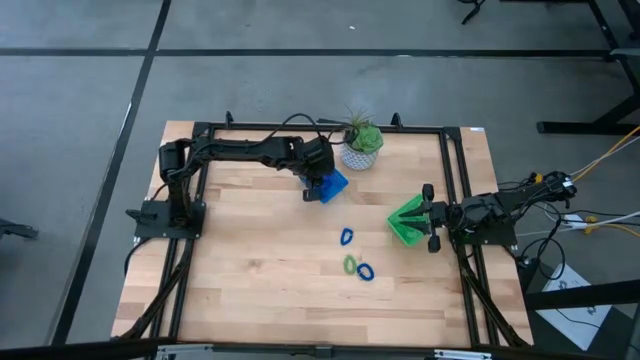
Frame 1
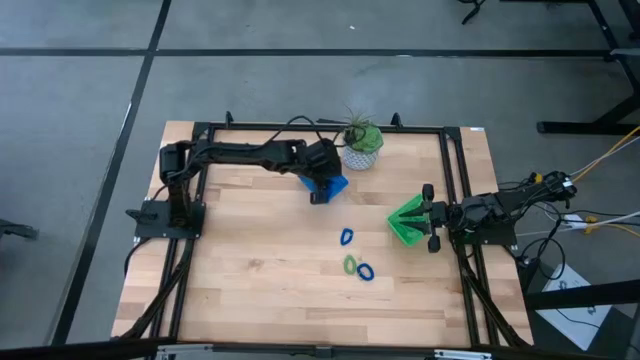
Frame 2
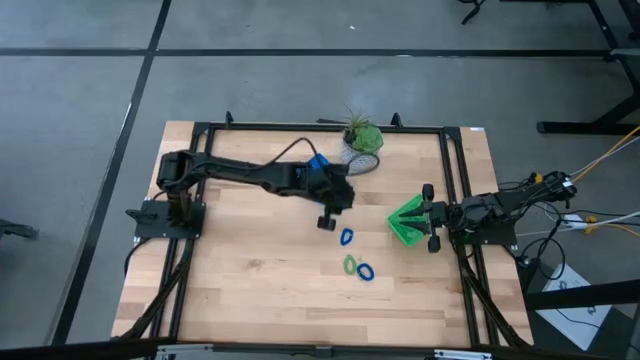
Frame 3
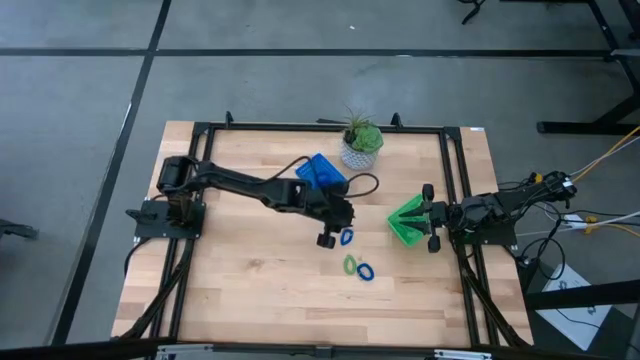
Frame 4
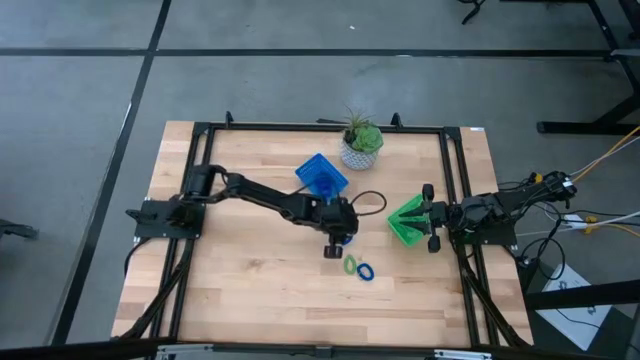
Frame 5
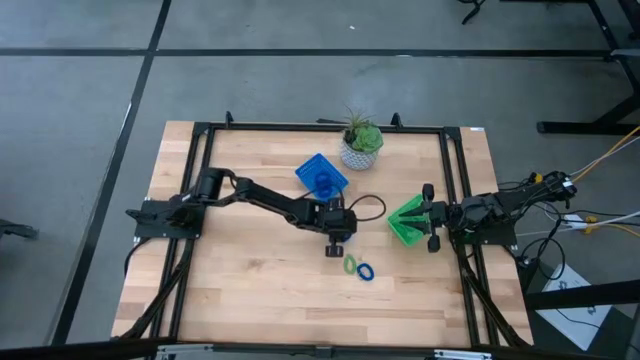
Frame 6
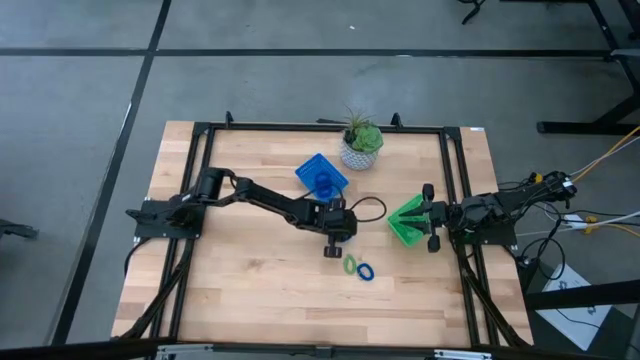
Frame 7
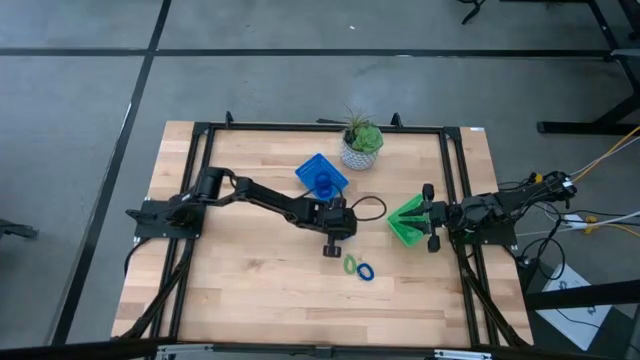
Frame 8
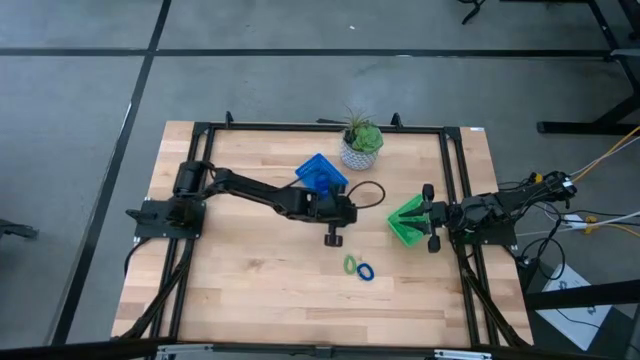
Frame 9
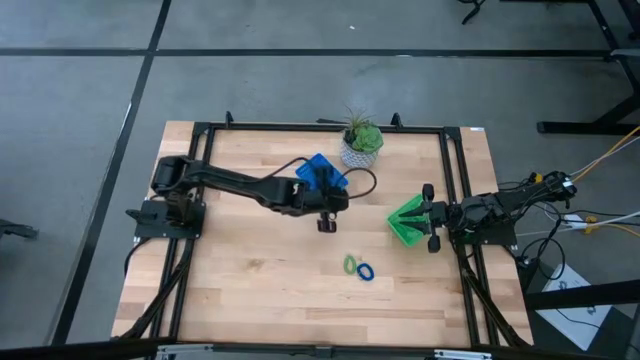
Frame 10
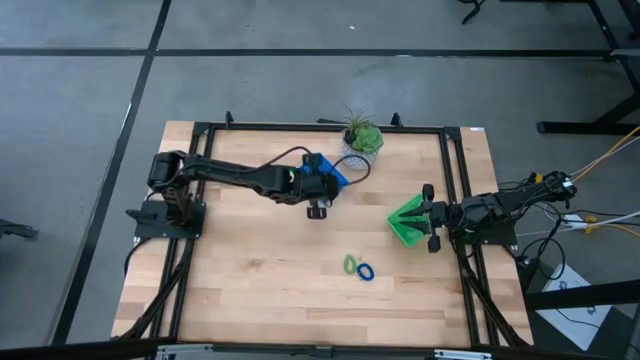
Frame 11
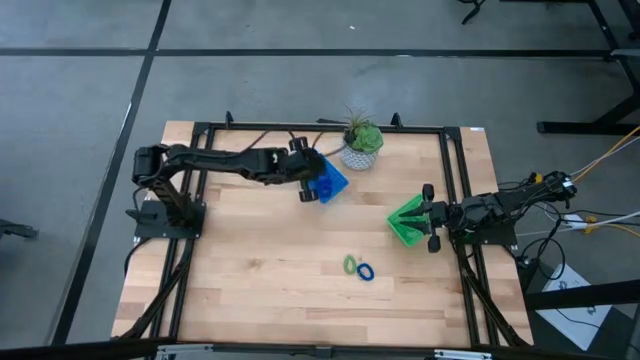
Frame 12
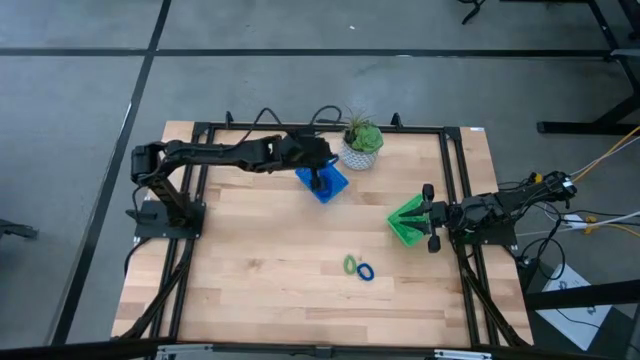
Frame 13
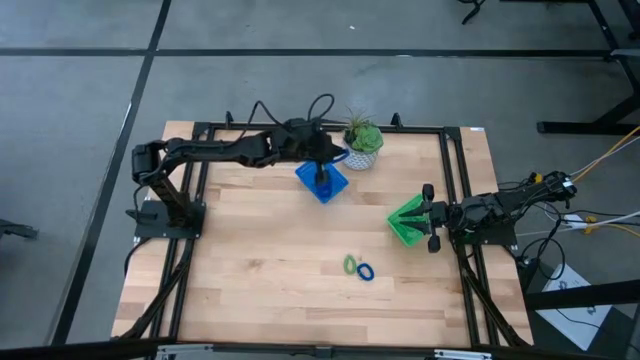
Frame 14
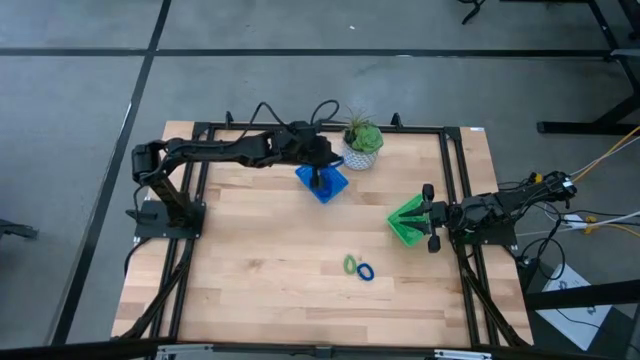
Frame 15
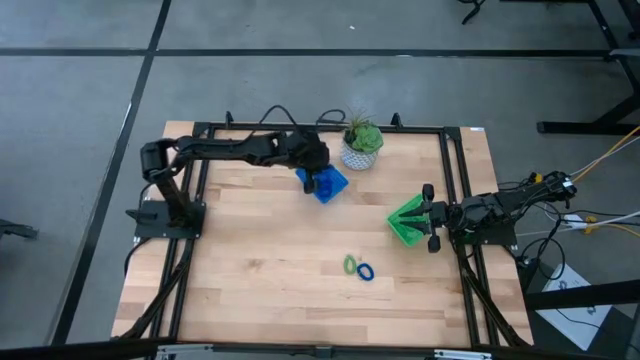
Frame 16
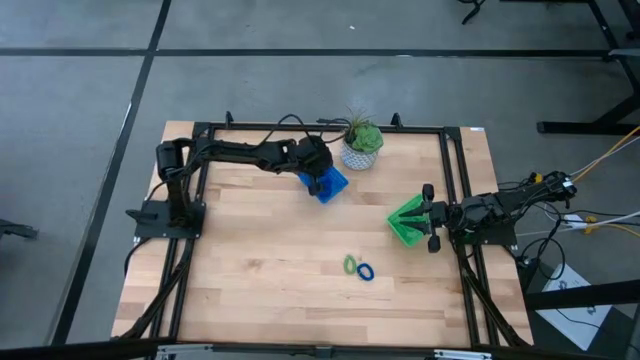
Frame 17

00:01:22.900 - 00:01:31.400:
Task: Sort items
Put the blue spring keychain into the blue bin

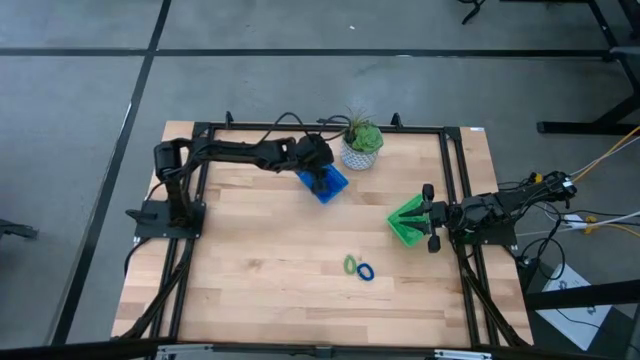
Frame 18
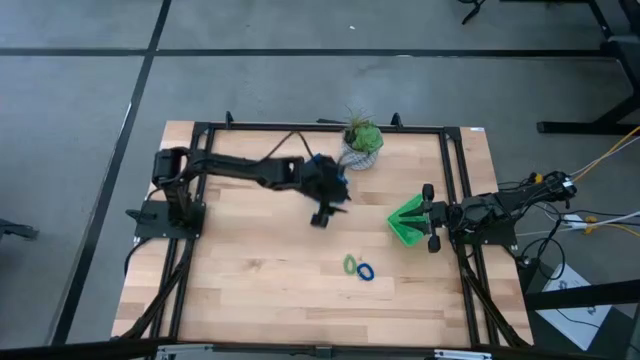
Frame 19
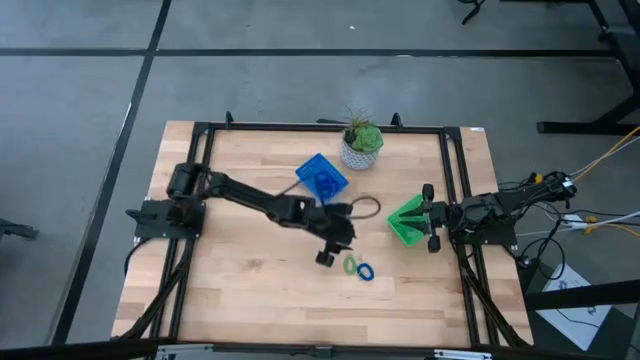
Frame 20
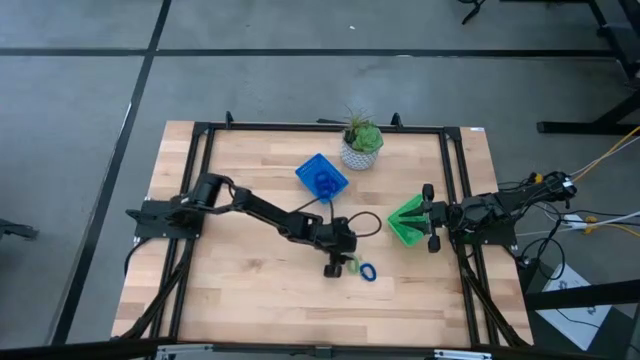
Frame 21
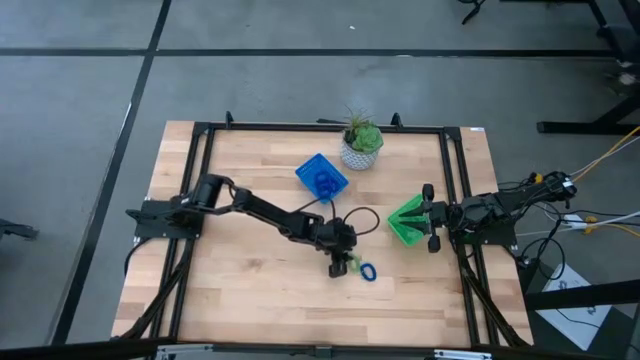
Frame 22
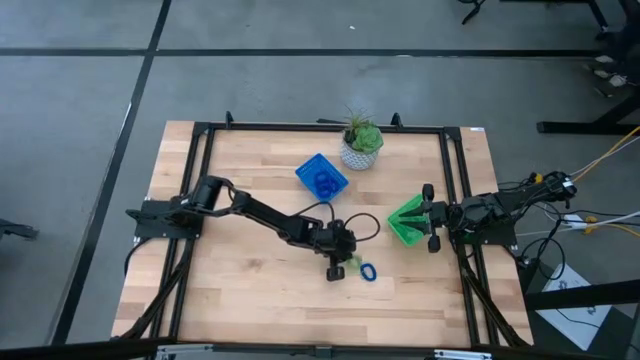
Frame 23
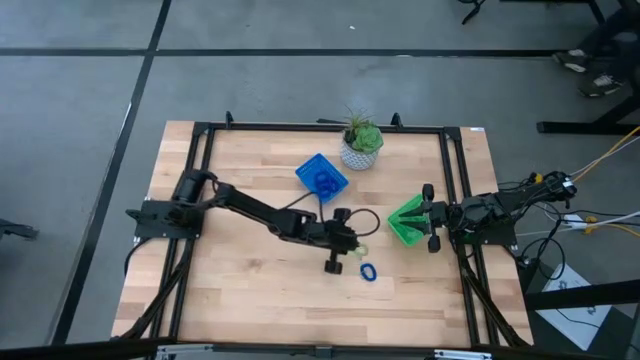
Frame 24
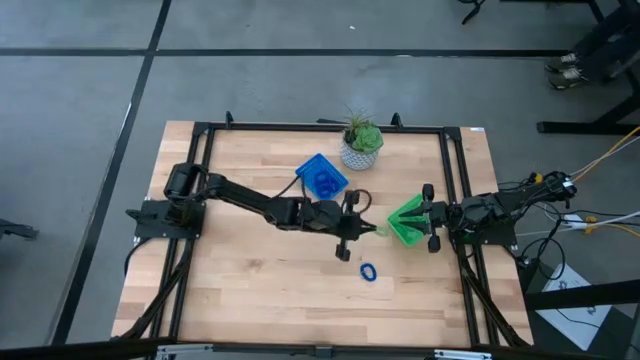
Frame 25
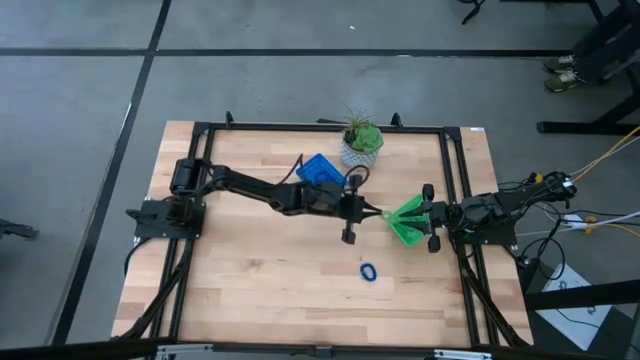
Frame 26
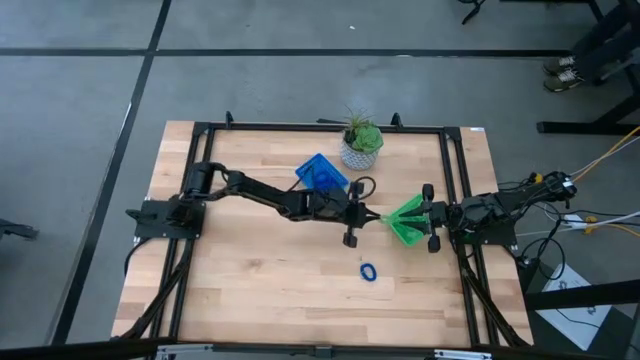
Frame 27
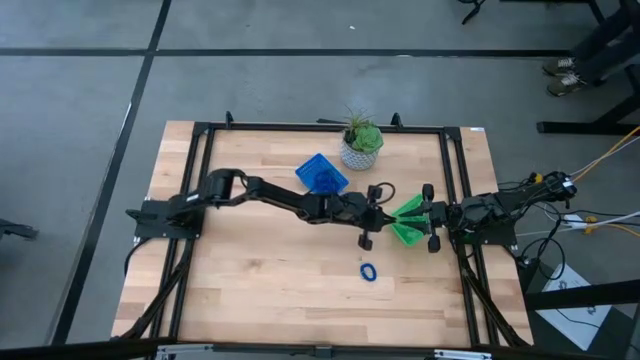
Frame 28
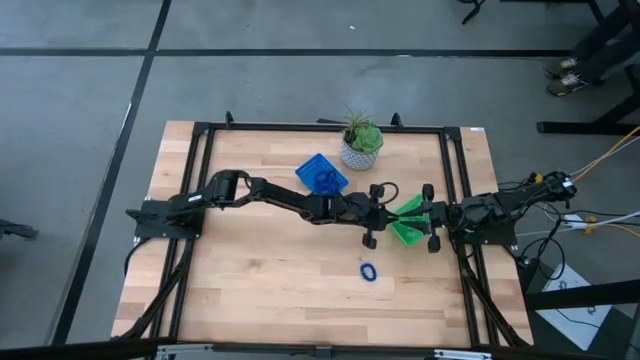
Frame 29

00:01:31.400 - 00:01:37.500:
Put the green spring keychain into the green bin

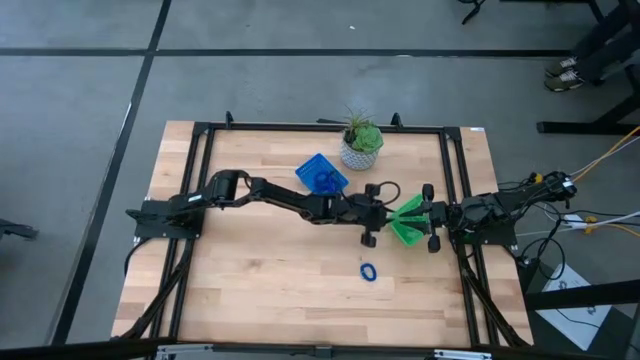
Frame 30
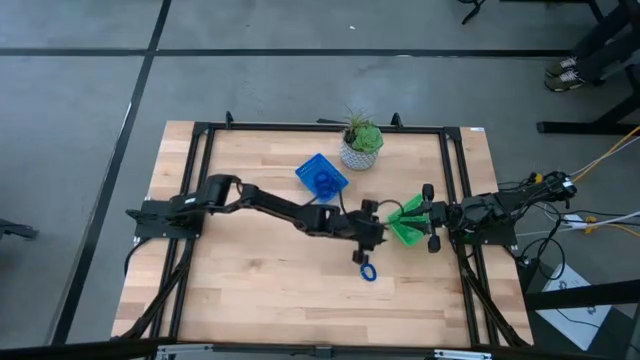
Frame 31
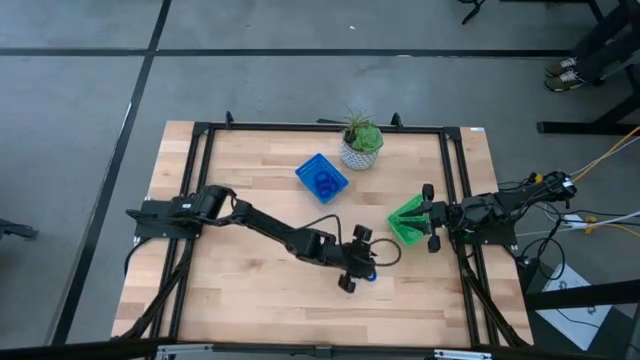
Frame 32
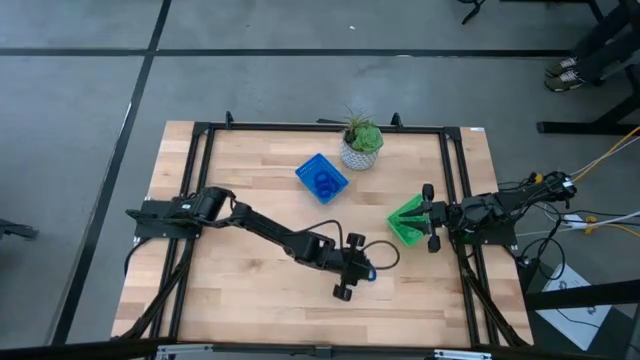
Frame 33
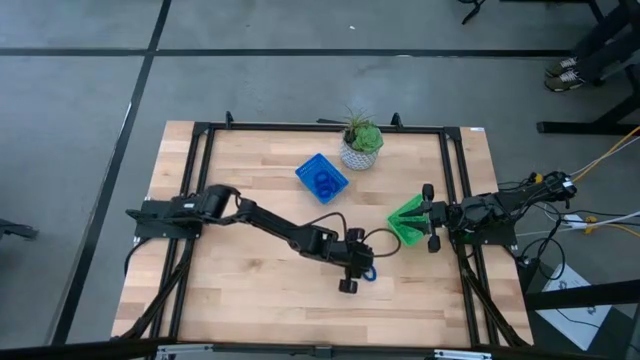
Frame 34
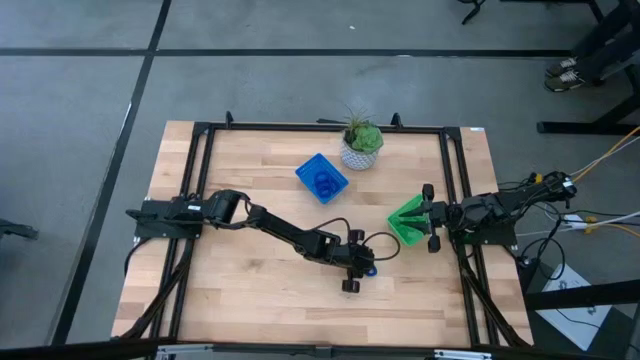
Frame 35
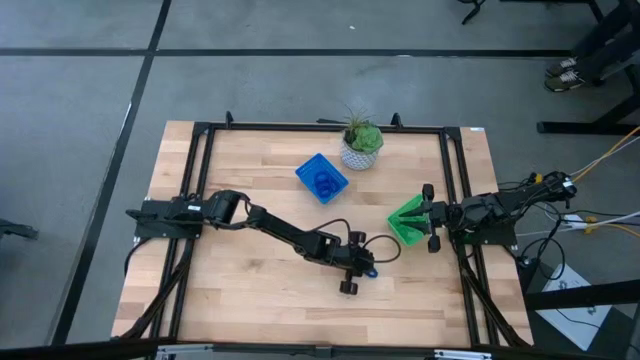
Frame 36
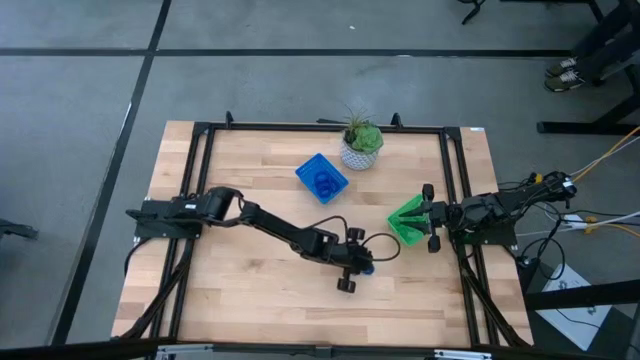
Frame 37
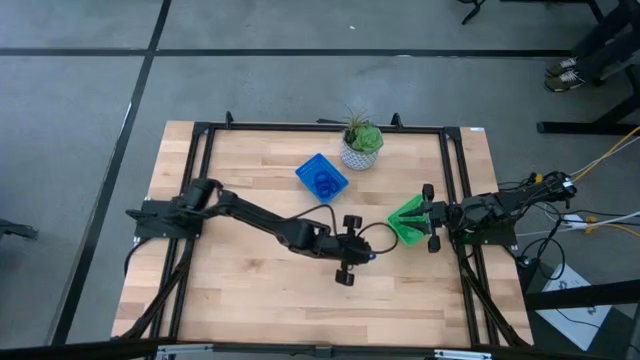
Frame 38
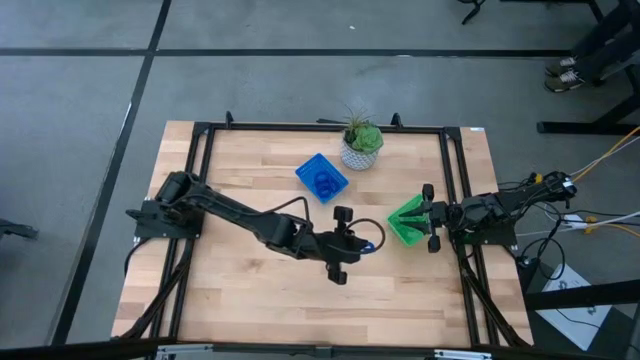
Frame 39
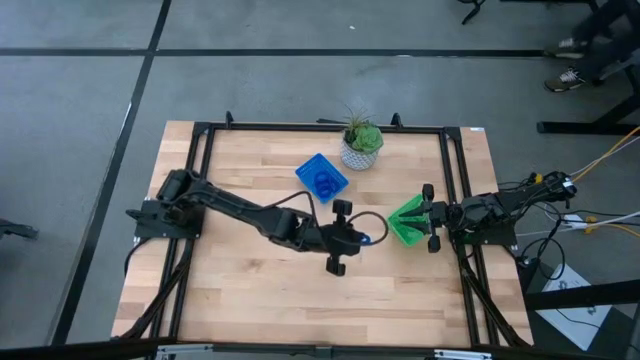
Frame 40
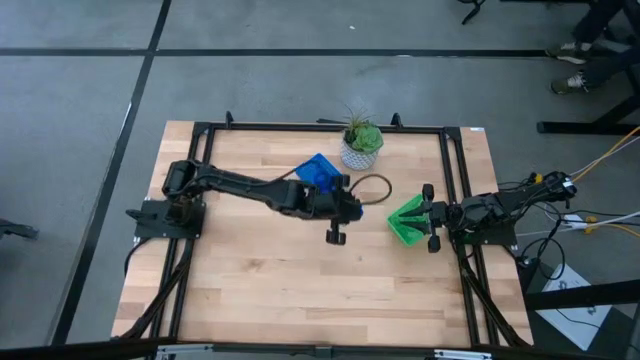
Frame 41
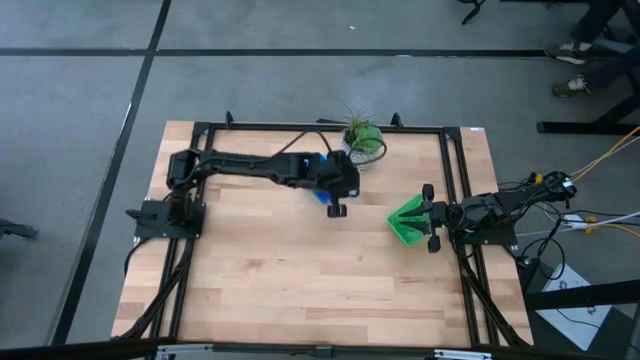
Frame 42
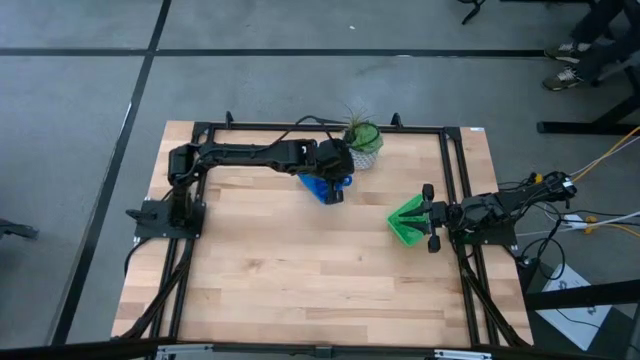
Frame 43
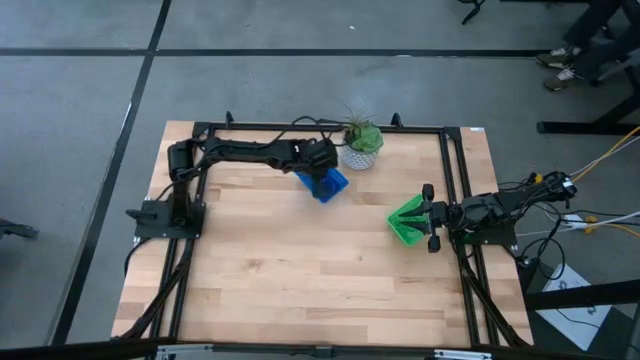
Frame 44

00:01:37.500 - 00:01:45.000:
Put the blue spring keychain into the blue bin
